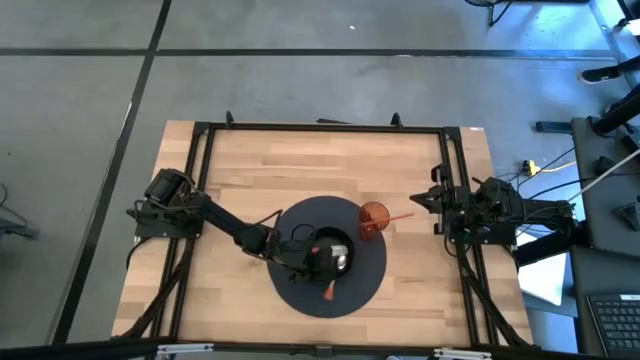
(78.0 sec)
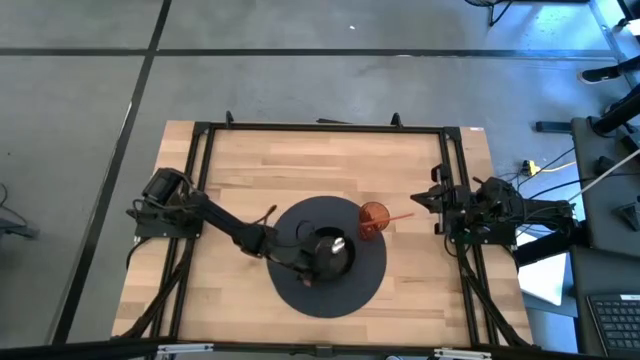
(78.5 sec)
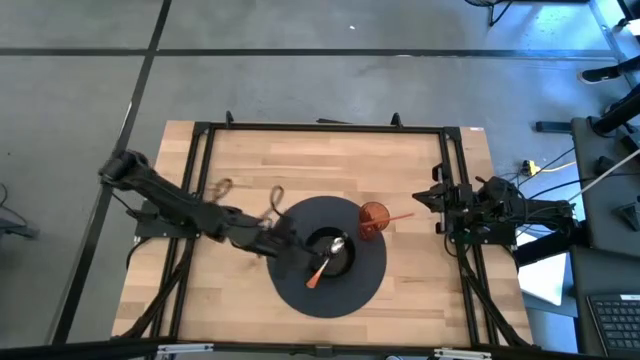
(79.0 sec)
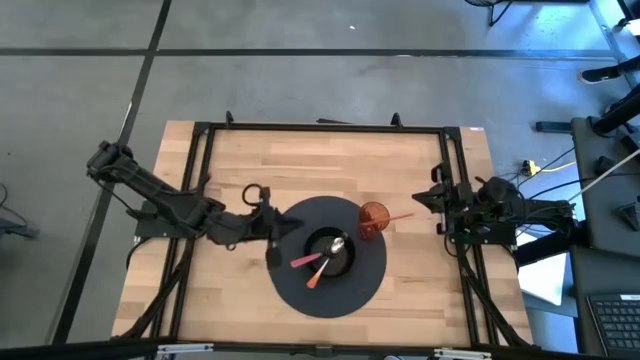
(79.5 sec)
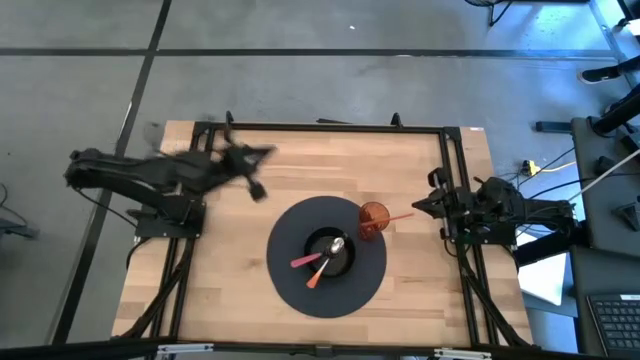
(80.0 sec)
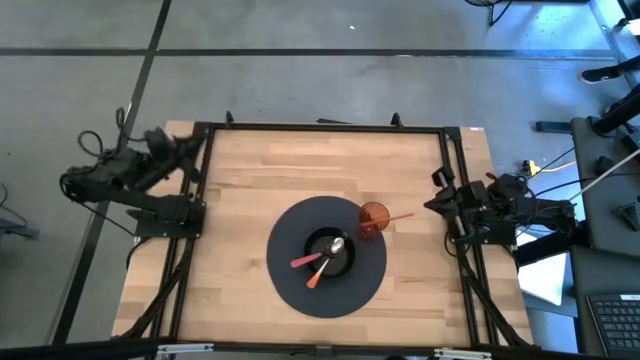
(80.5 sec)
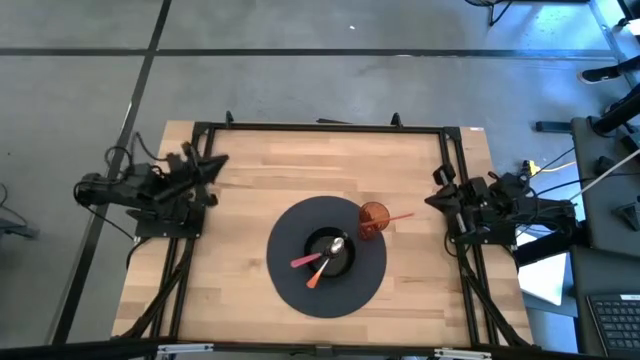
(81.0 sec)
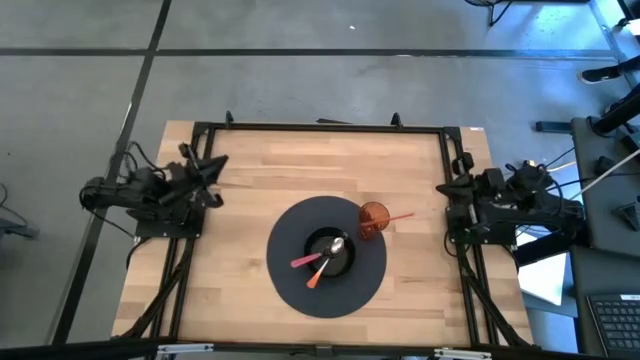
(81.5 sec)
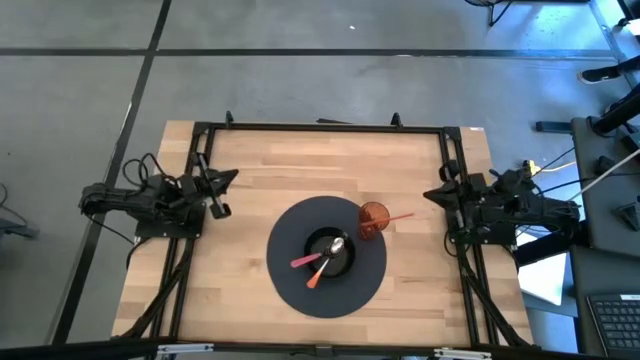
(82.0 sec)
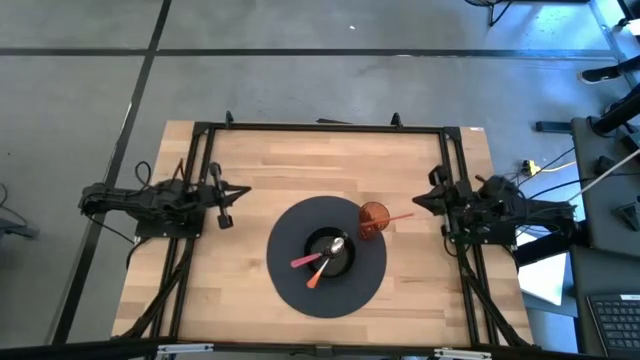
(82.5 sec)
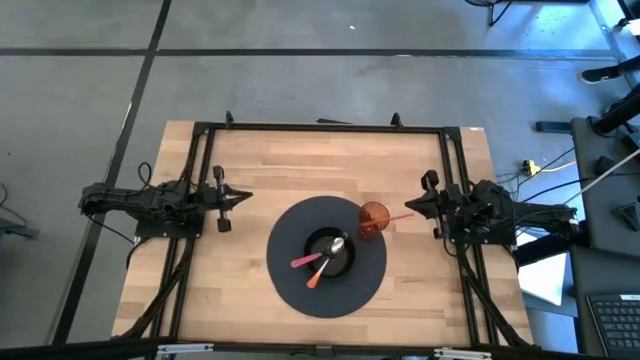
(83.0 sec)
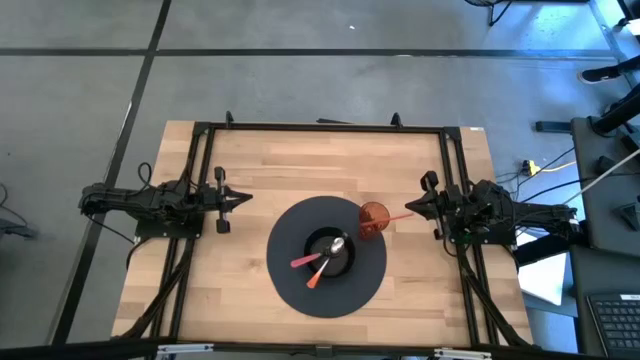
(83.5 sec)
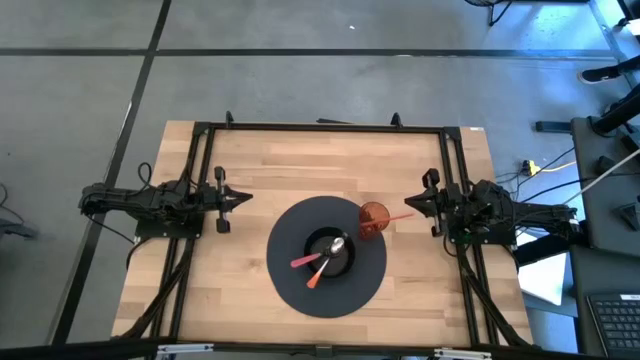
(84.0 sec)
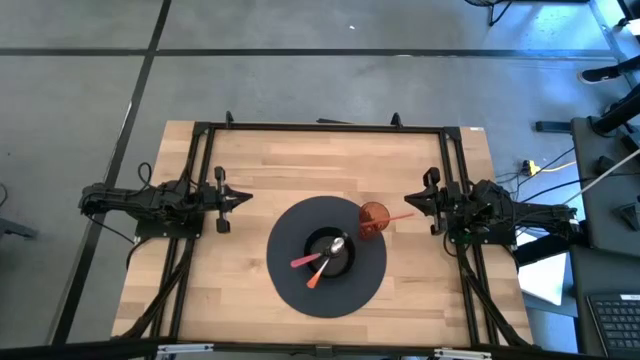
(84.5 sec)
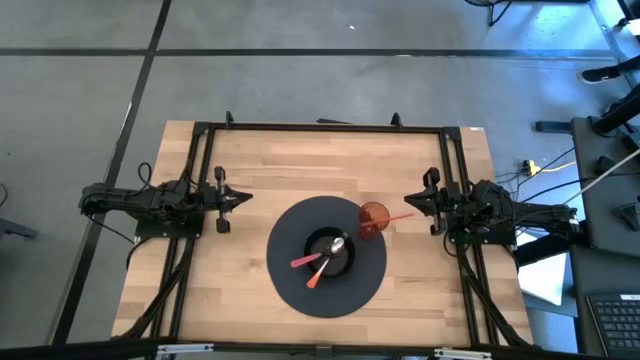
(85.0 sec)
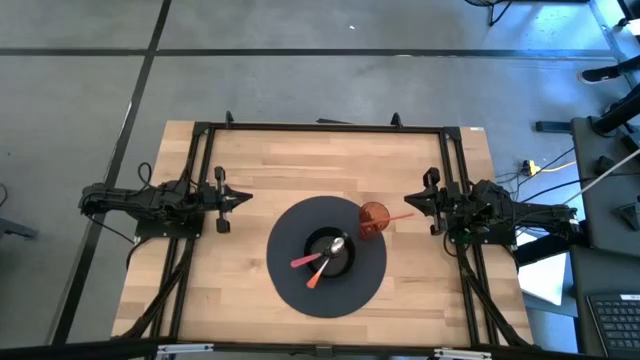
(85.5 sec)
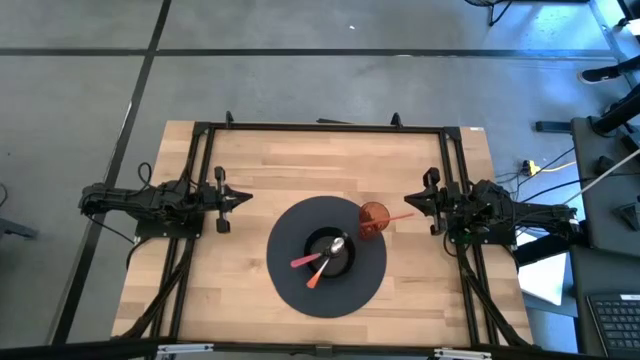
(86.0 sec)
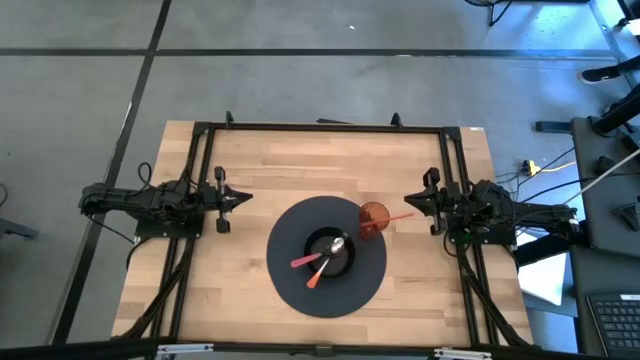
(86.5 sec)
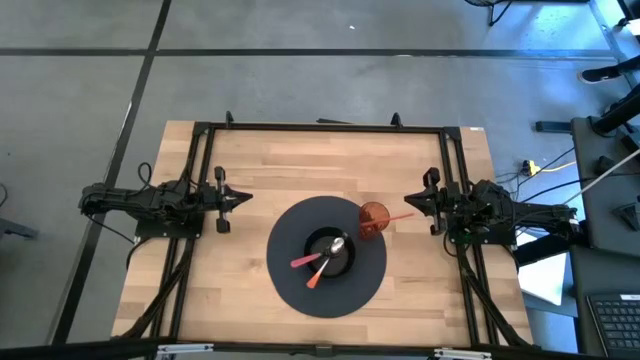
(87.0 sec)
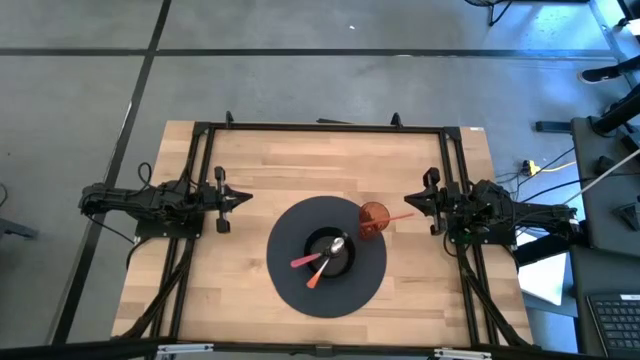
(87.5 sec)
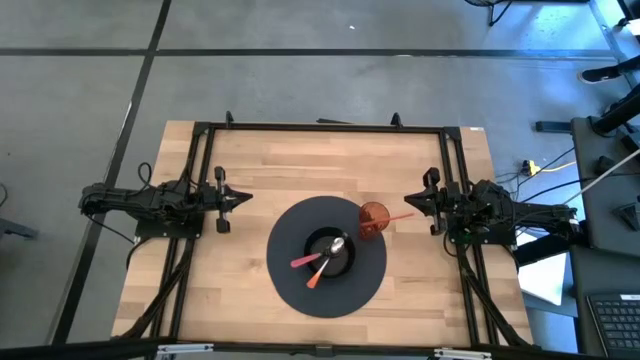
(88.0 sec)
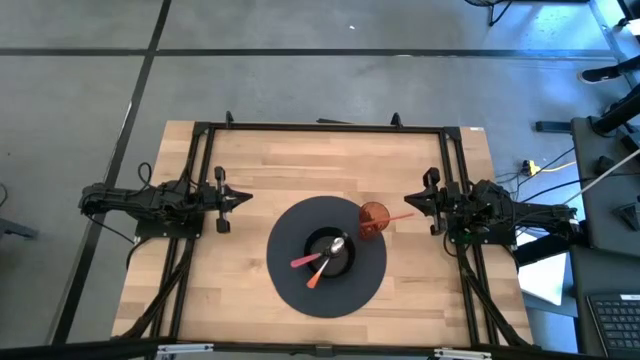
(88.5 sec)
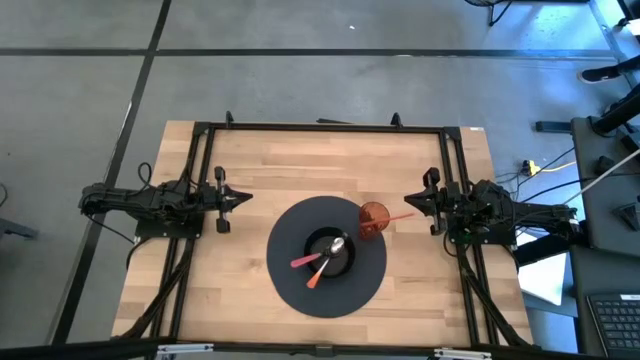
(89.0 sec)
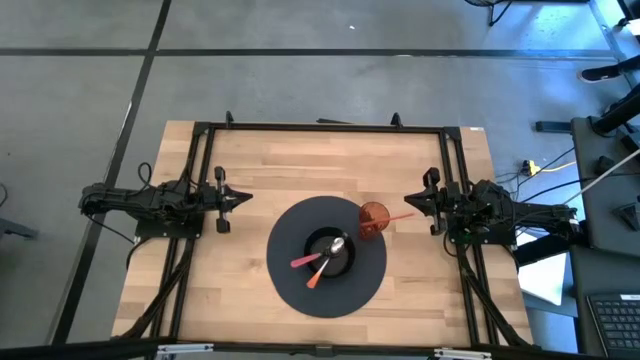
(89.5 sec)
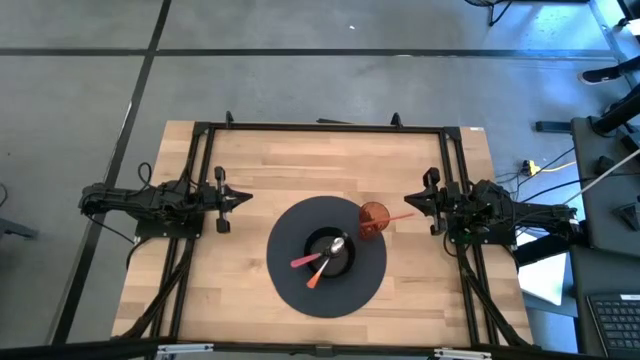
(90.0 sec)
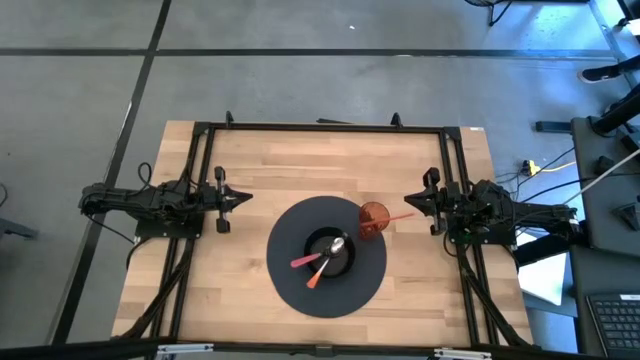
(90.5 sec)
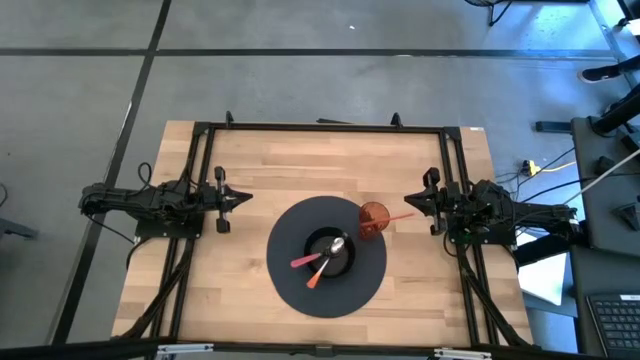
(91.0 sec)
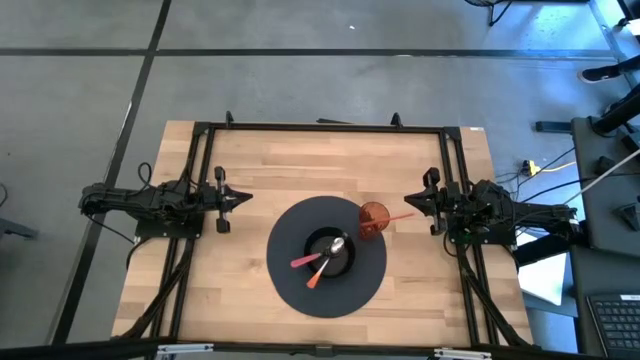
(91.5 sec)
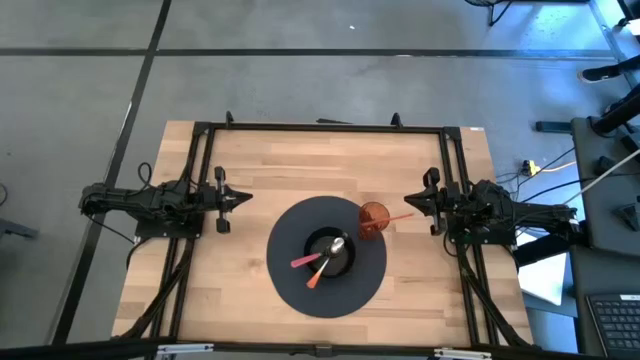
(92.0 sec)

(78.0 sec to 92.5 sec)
Task: Pick & Place Utensil
Return to Home Position

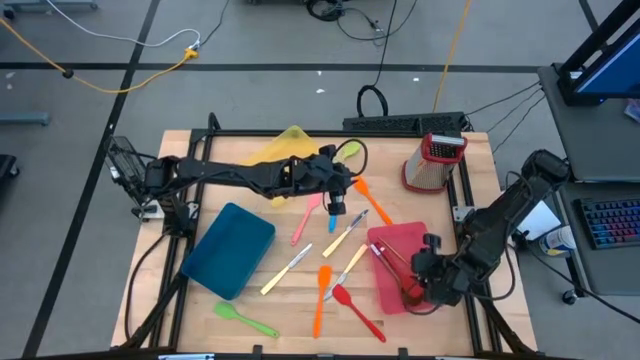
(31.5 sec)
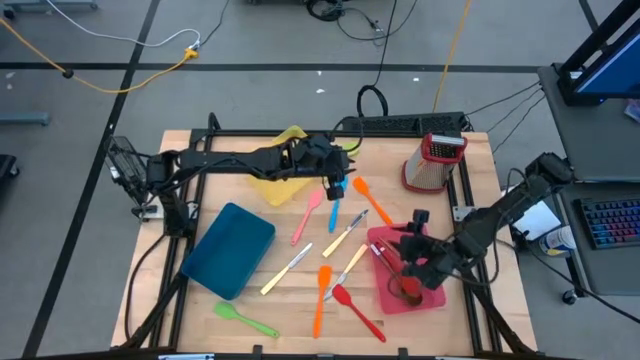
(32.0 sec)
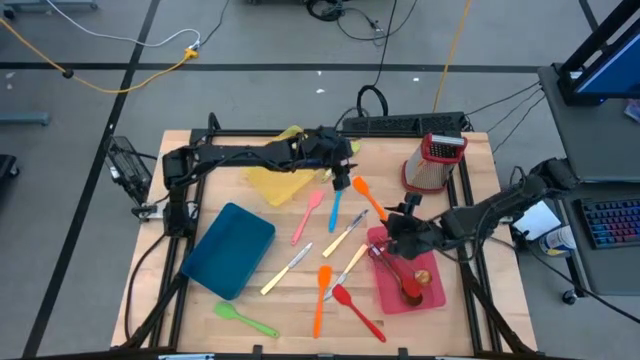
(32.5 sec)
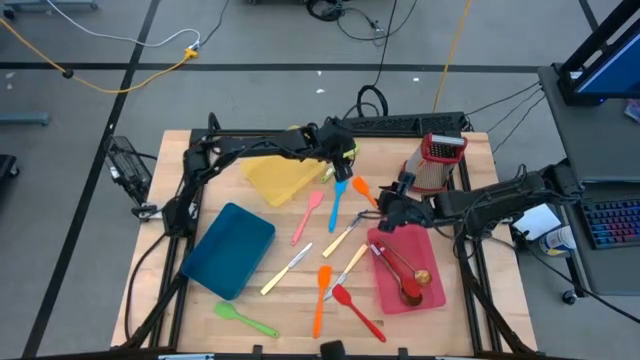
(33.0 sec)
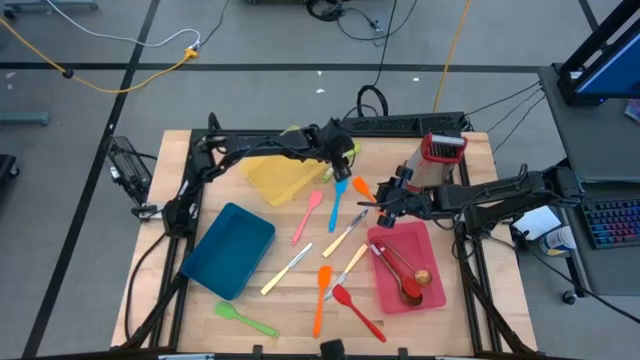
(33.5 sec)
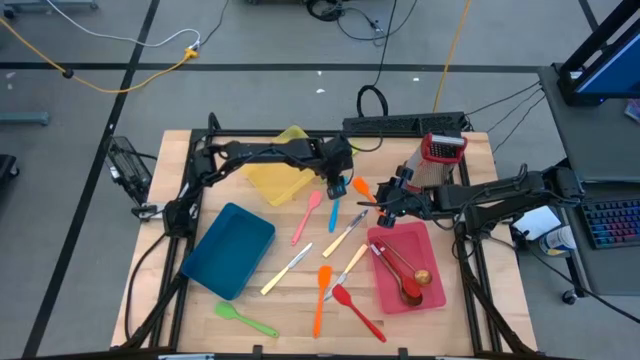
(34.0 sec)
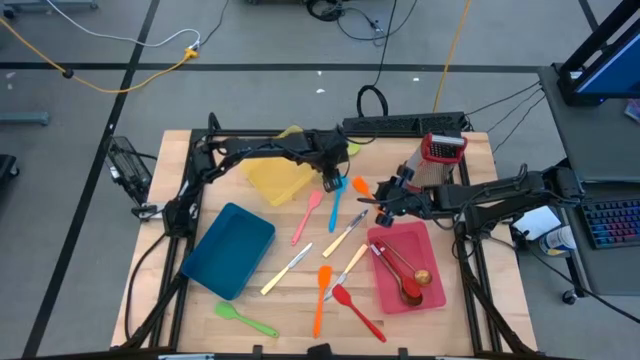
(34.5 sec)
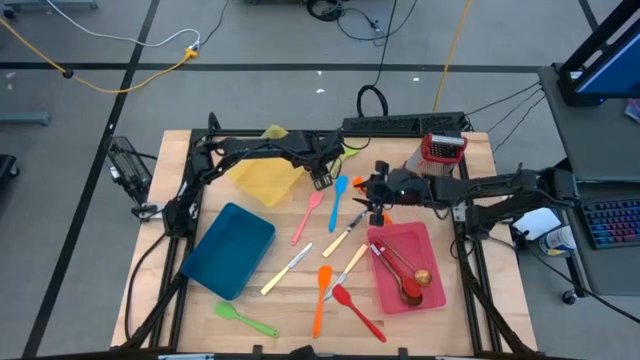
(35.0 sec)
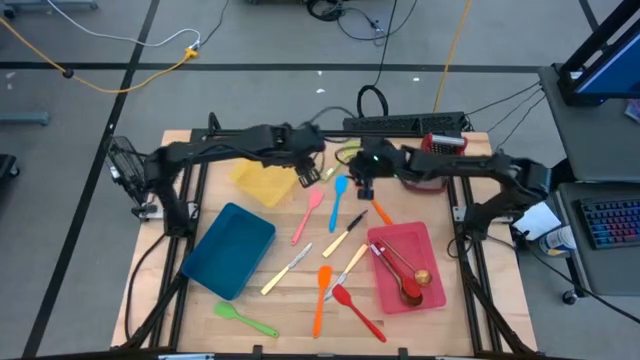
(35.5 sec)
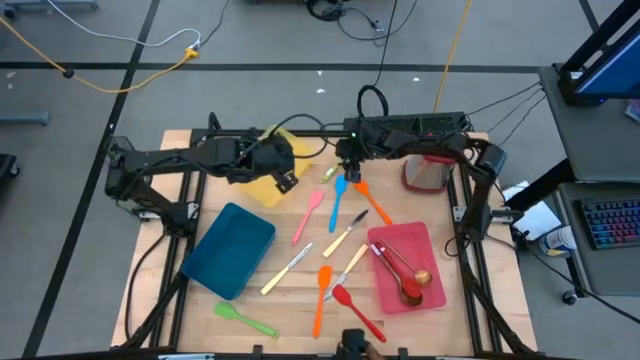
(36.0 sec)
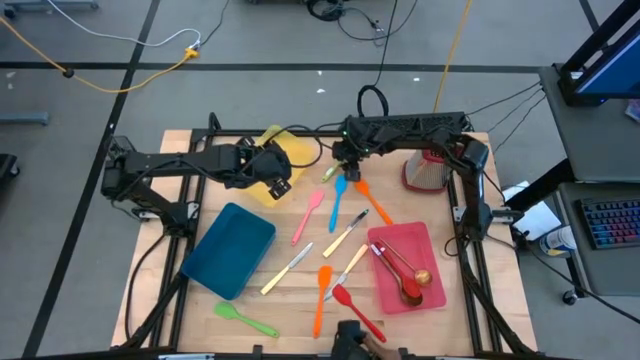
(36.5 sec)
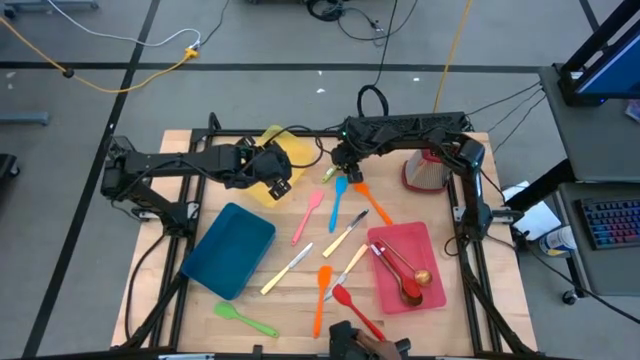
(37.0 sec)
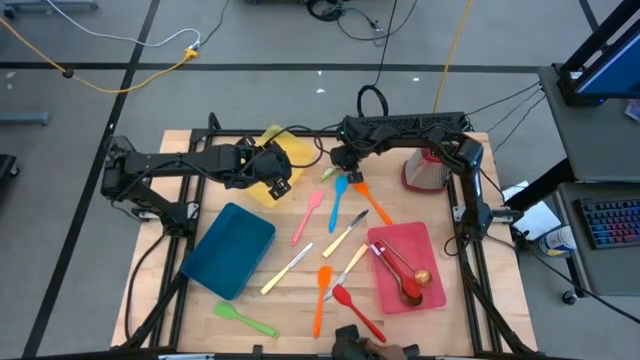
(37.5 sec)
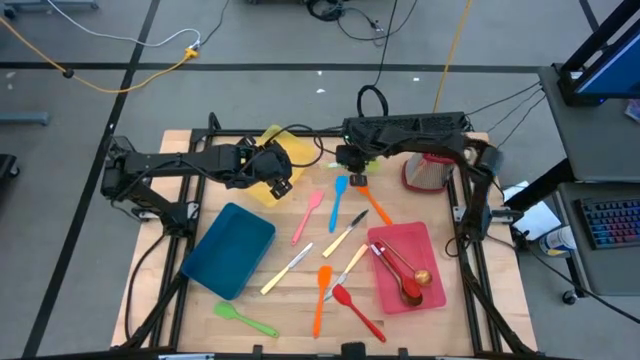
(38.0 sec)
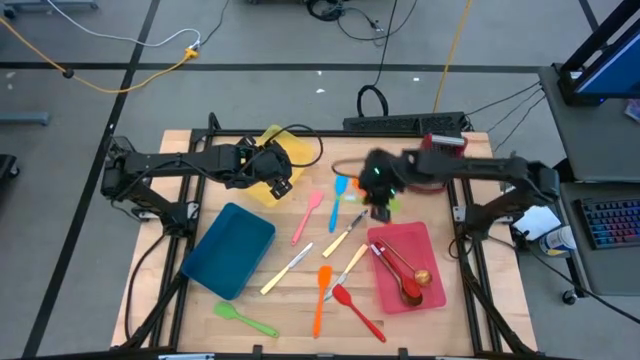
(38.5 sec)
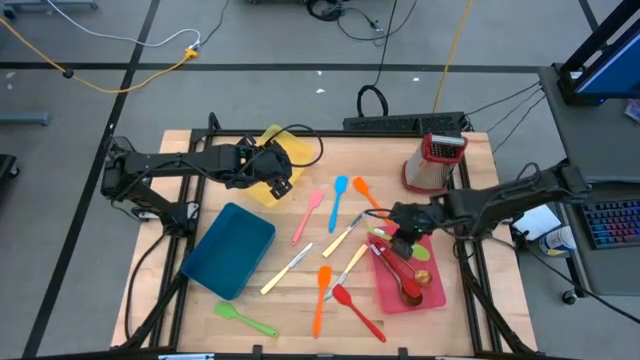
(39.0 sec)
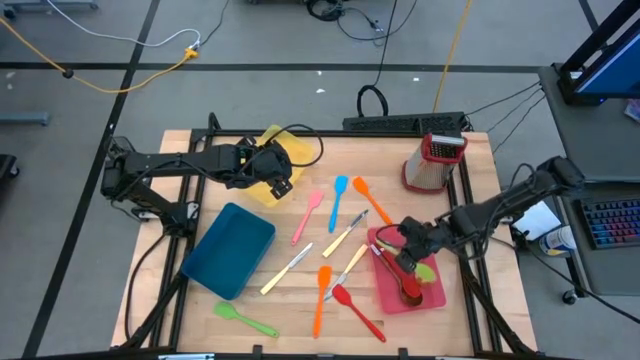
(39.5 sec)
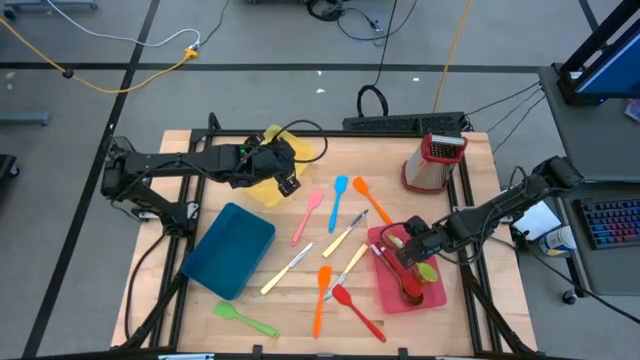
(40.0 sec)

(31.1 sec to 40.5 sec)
Task: Pick & Place Kitchen Items
Put the light green serving spoon into the pink bin
